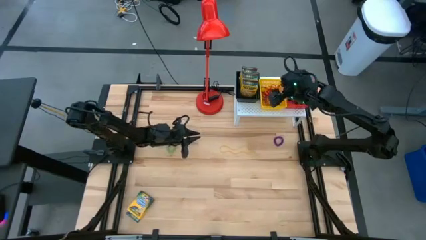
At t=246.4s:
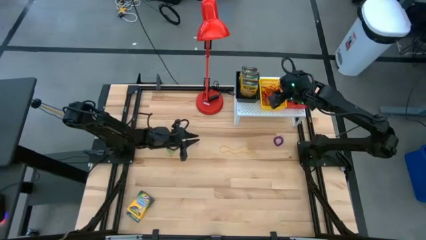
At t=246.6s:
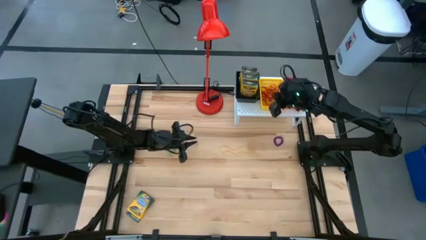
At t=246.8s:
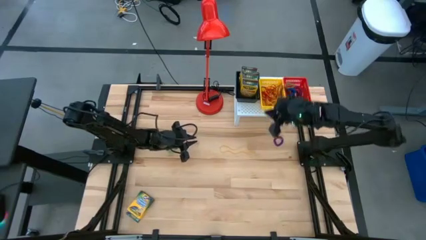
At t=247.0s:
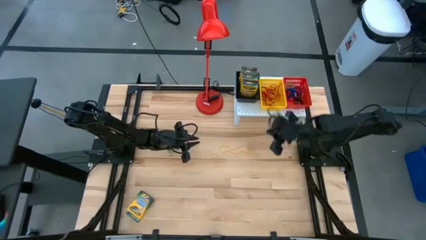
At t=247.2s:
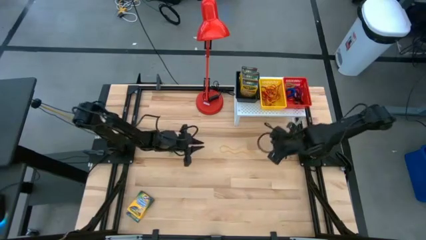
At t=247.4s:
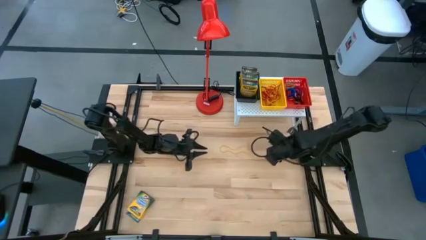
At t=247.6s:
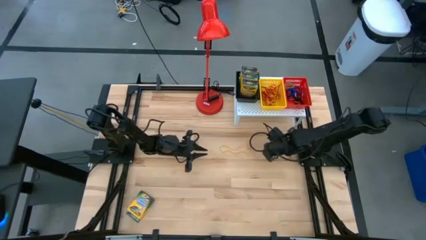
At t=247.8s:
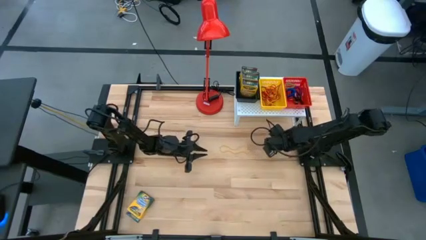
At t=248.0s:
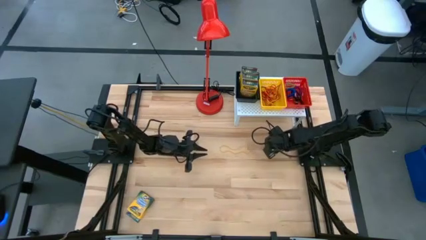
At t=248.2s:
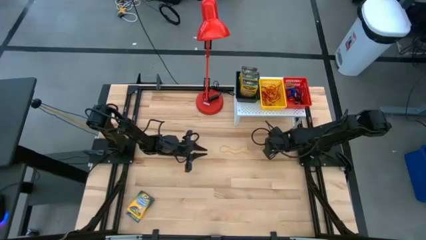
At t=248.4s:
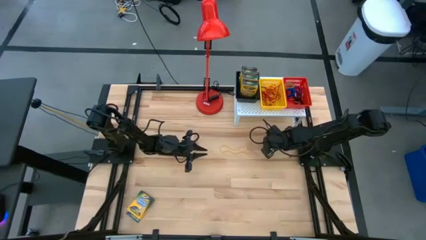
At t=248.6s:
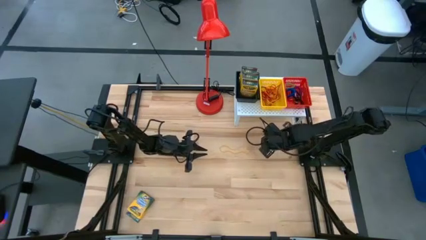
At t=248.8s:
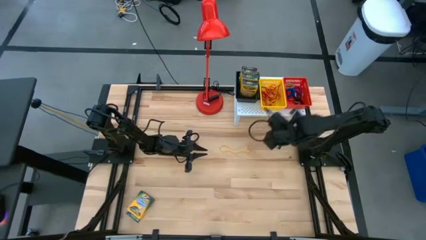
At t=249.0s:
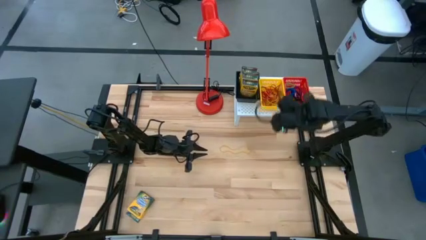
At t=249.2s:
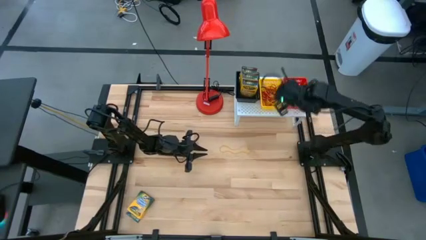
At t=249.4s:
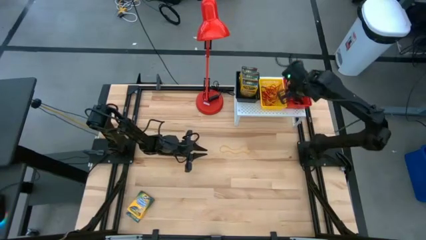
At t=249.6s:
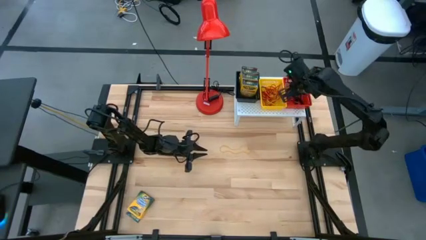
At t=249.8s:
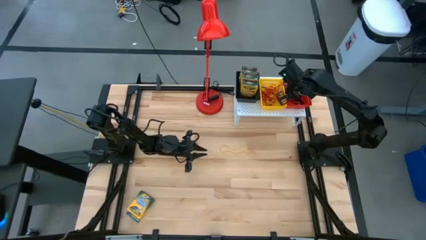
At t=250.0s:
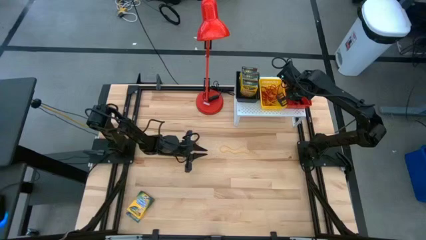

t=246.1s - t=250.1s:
Task: Pick & Place Office Desk Supplies
Put the violet spring keychain into the red bin

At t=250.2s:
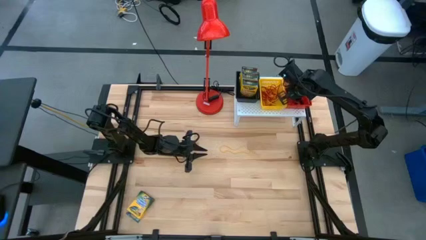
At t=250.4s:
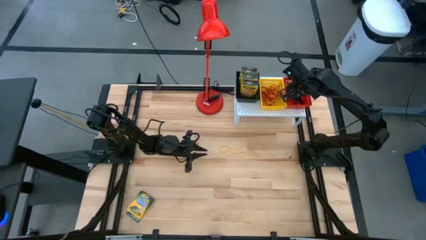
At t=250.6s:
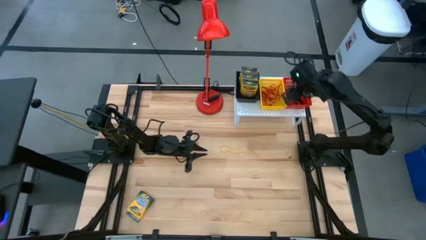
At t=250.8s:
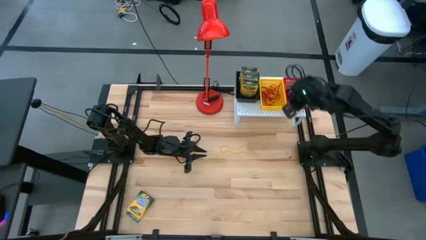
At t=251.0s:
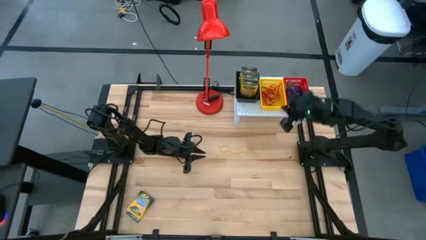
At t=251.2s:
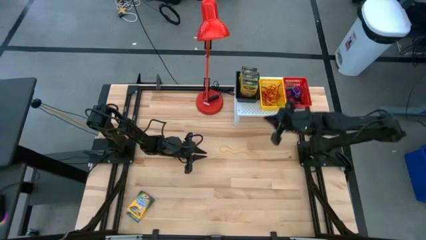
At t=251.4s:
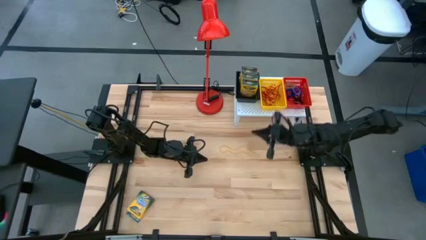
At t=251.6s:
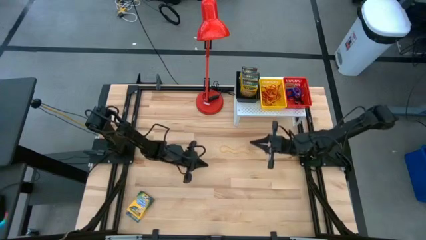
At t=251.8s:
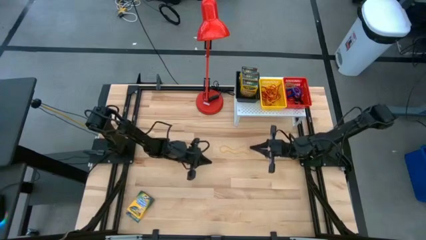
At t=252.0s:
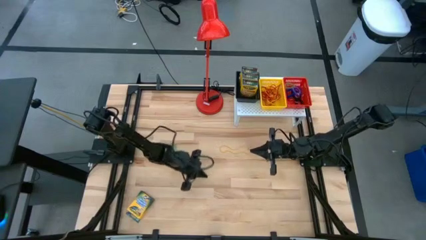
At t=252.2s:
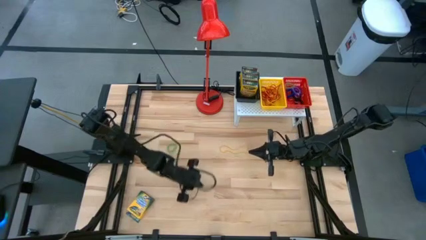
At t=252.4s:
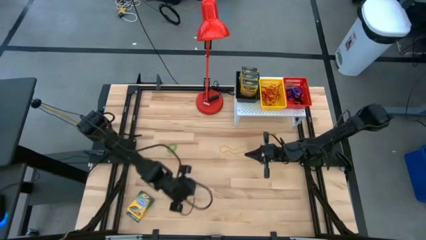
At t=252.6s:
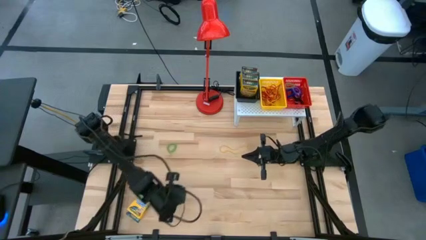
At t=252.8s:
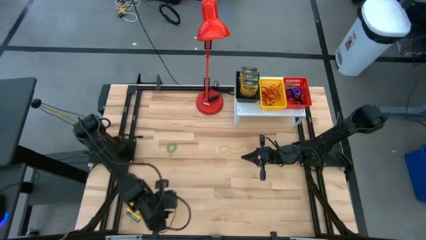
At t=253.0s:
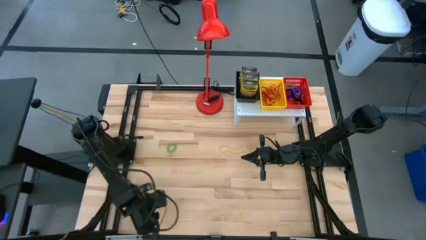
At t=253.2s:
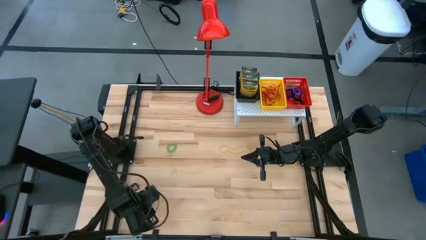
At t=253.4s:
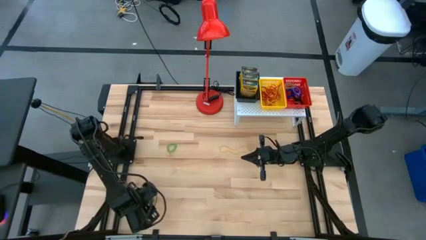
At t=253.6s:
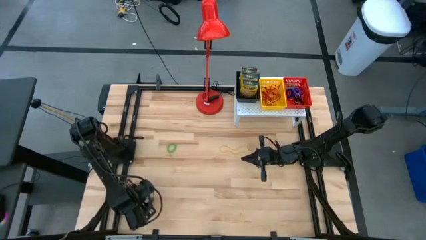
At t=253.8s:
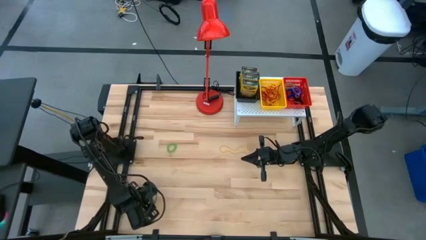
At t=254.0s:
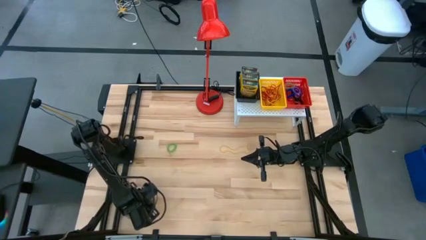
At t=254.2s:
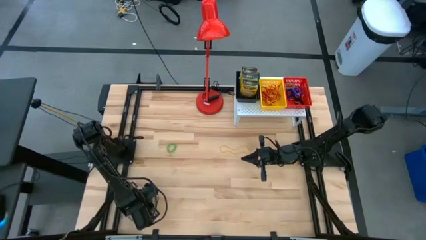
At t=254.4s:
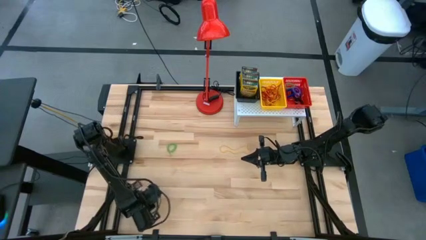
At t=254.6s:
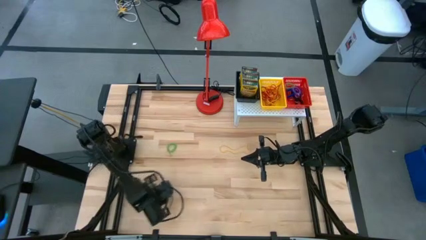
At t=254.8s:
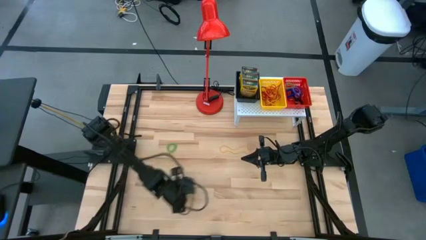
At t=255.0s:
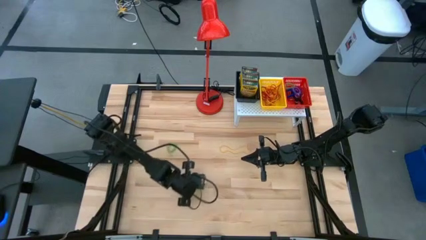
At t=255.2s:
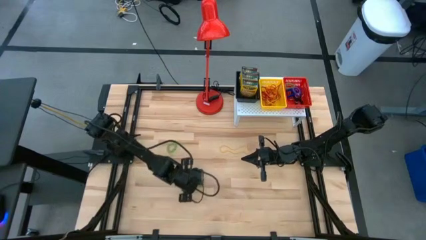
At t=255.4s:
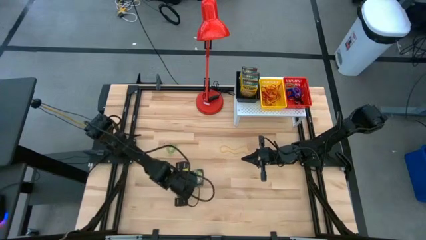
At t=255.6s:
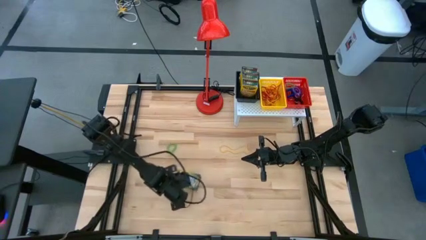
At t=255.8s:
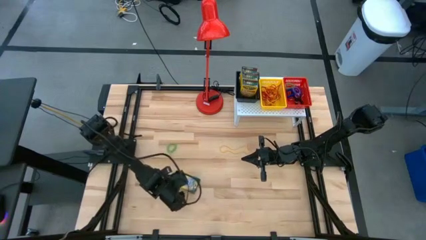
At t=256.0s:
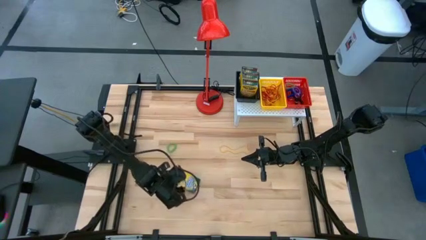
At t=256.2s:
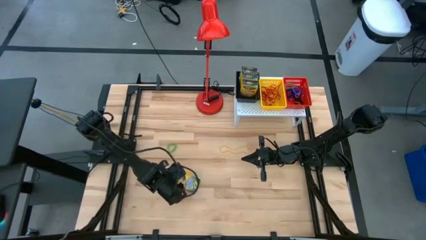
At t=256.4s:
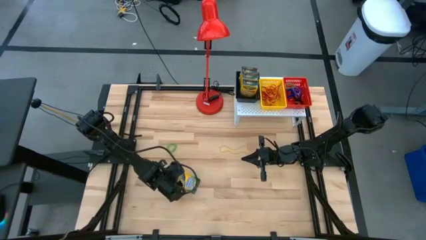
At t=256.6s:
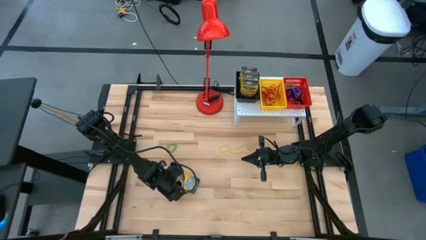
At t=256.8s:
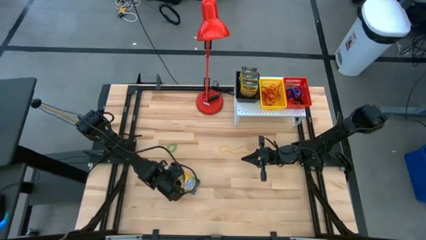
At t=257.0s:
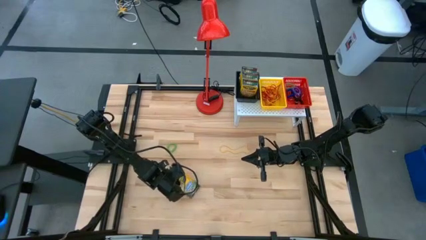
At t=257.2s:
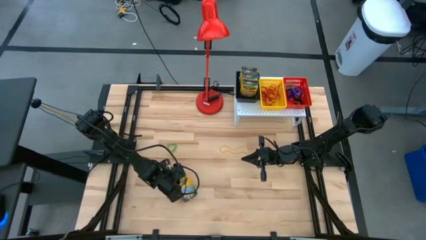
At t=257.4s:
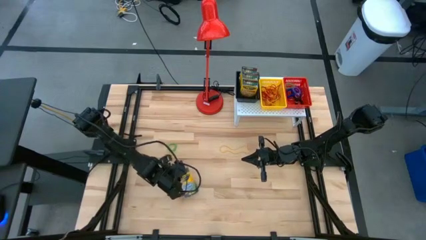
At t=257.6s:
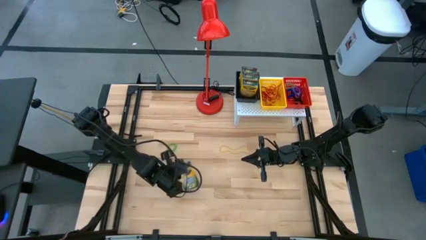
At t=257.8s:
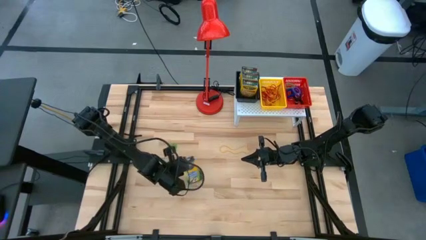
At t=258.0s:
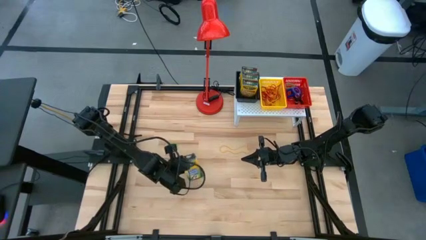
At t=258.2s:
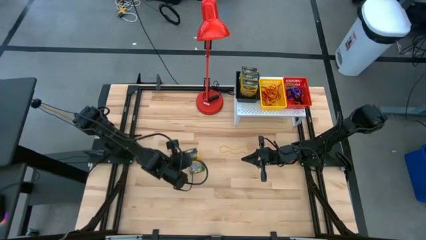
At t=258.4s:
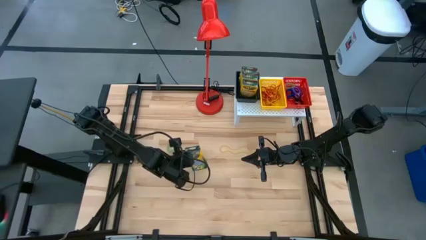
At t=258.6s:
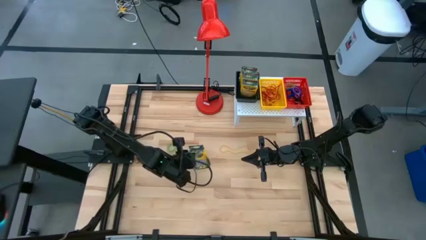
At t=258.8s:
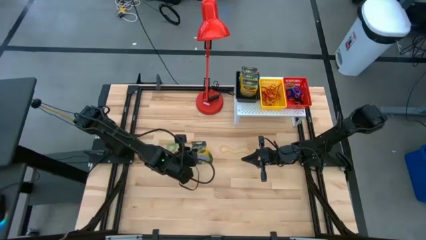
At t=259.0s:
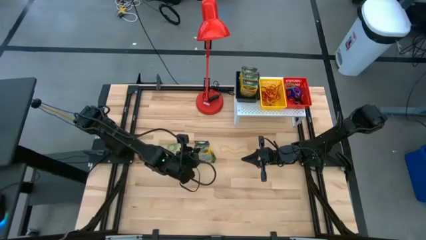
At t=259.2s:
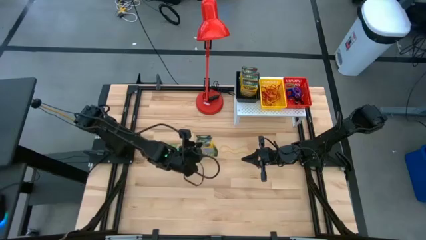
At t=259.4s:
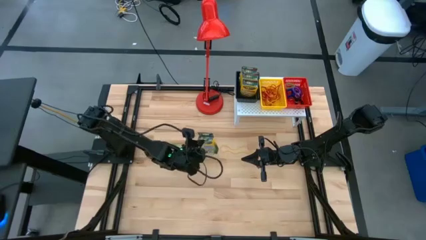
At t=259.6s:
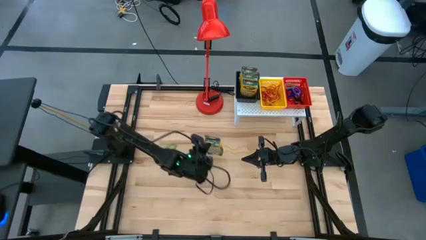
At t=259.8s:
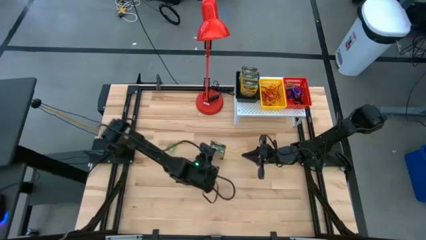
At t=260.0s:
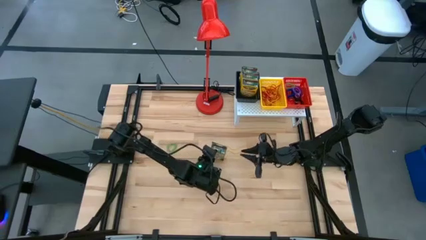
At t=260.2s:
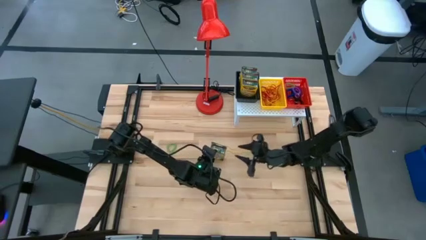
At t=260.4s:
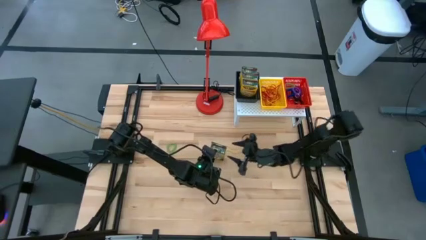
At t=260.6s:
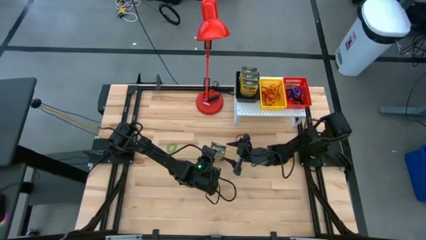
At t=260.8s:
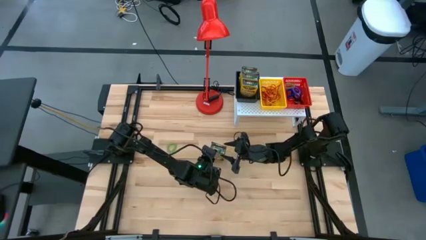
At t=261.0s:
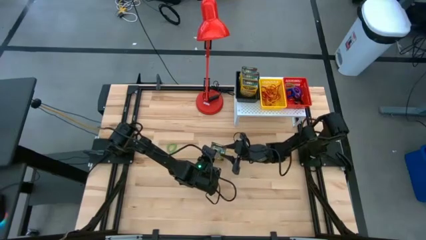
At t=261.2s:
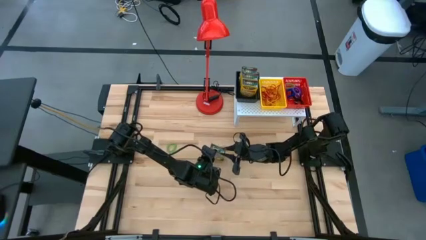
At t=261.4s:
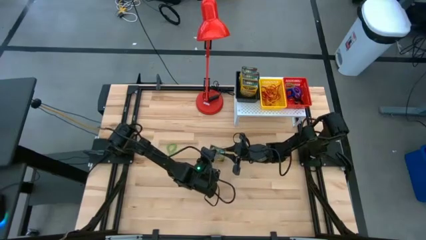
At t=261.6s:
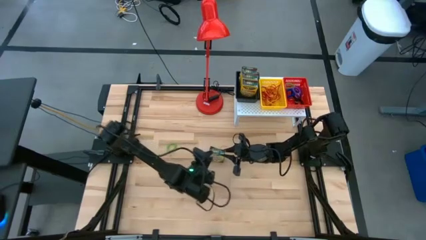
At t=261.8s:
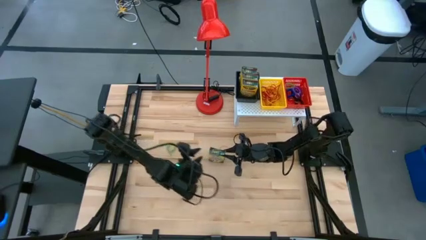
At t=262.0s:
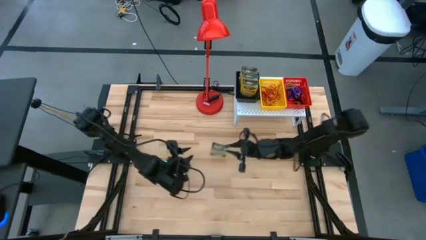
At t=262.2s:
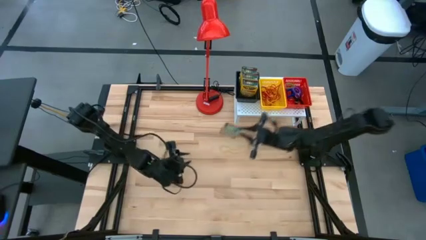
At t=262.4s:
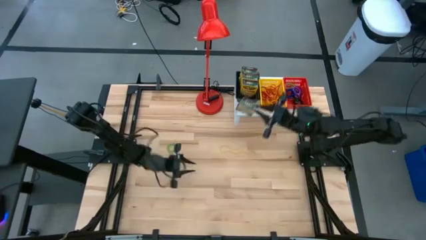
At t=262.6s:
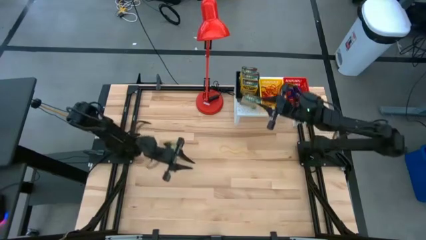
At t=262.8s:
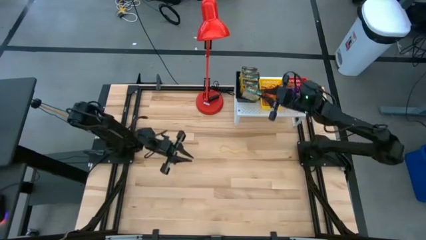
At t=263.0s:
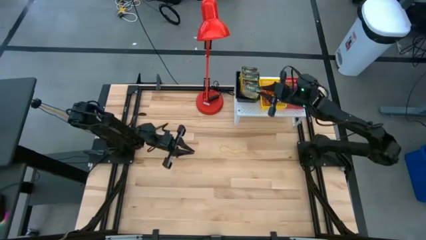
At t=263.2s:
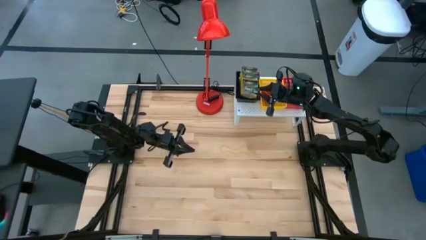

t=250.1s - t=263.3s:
Put the crayon box into the black bin
